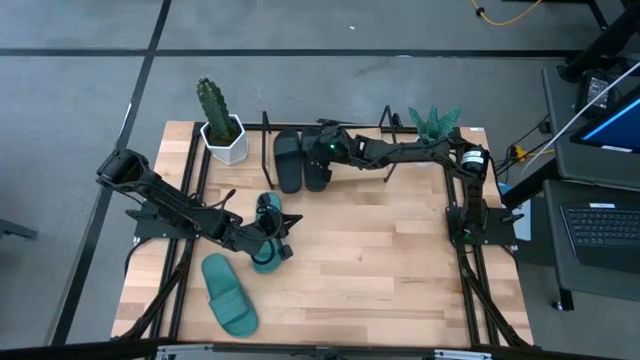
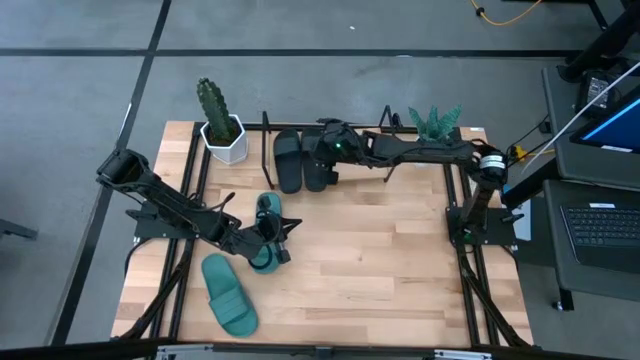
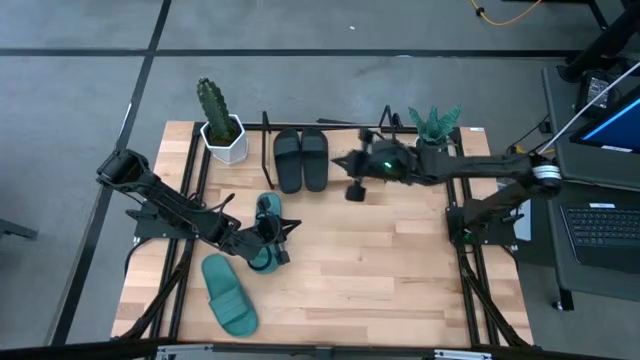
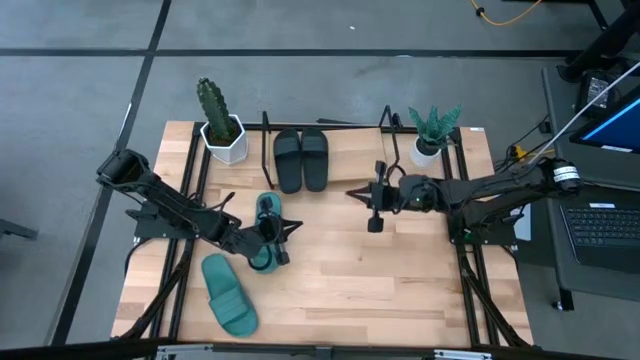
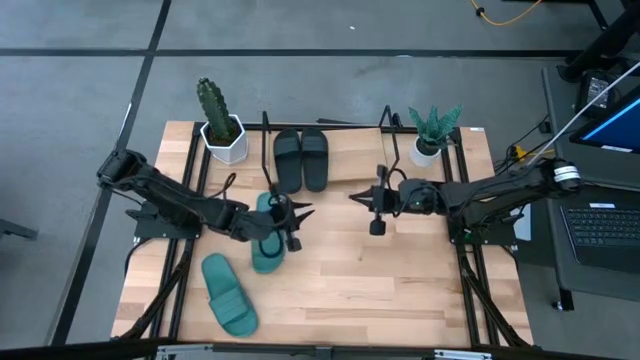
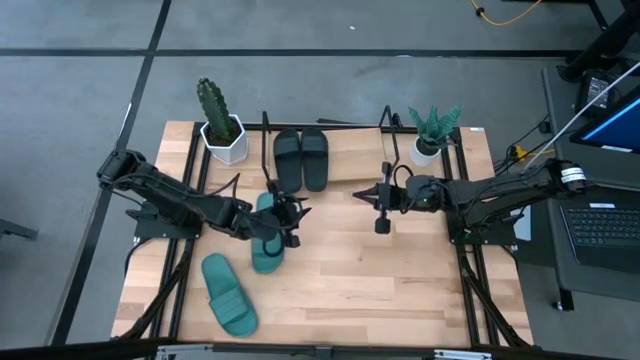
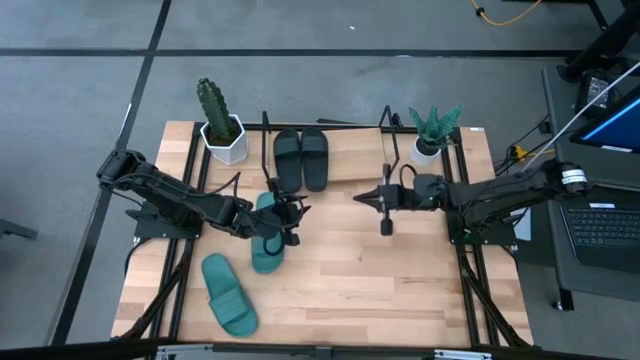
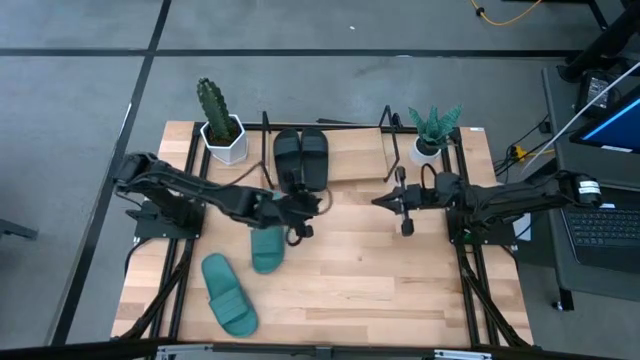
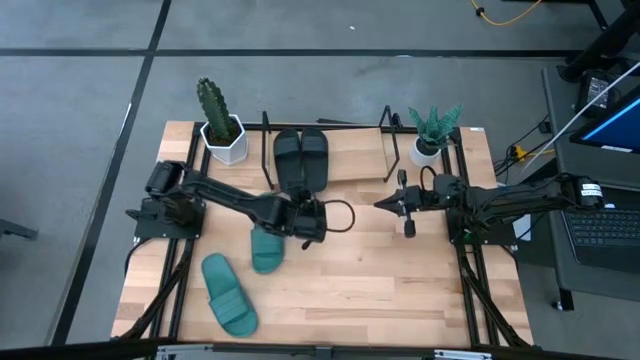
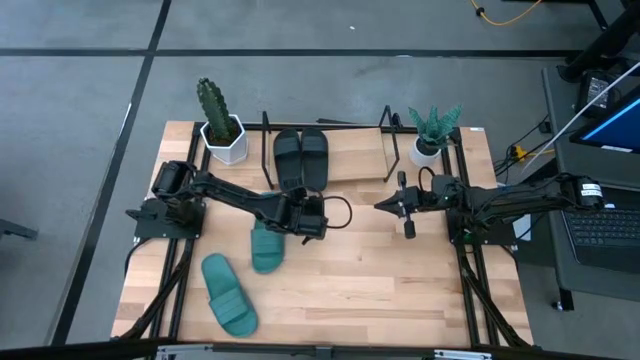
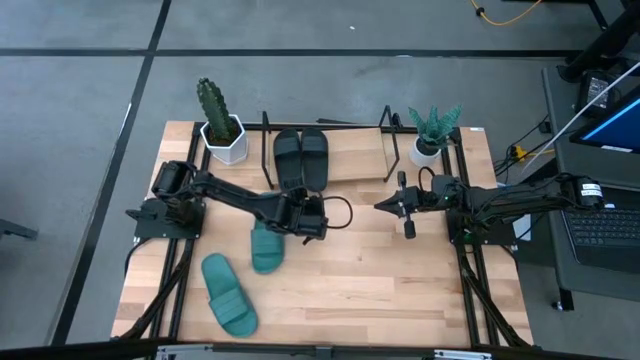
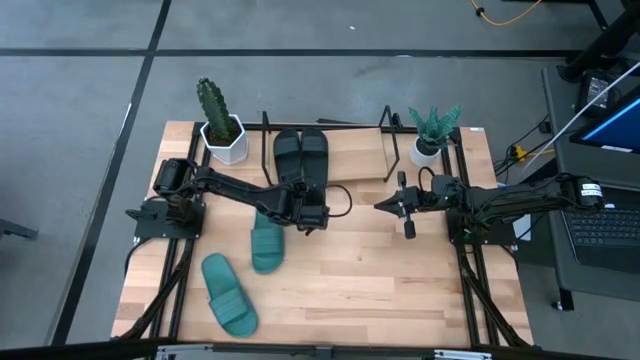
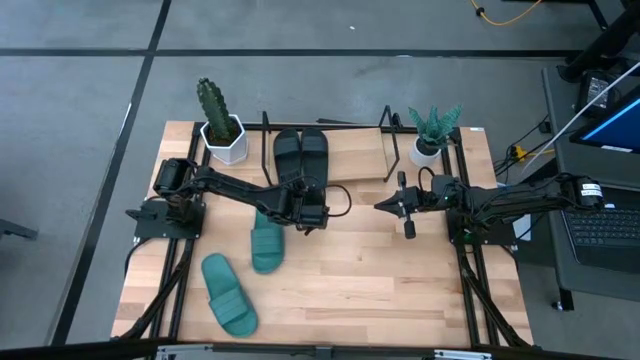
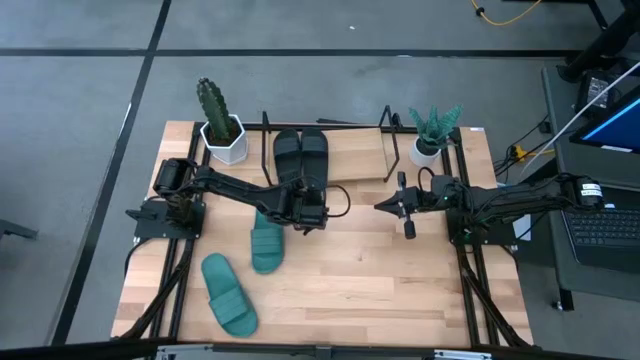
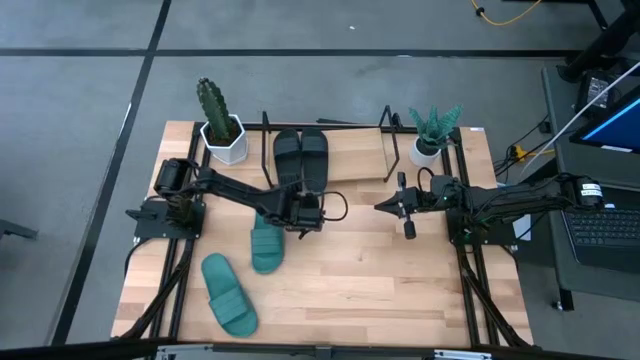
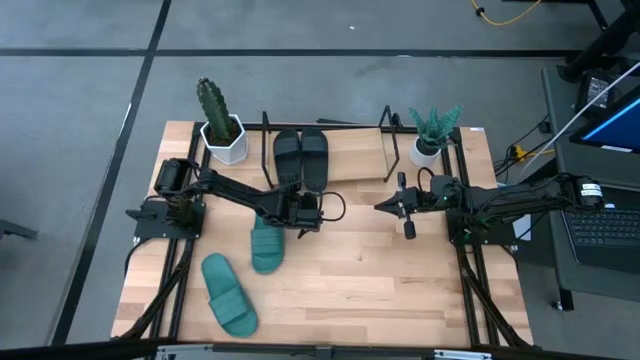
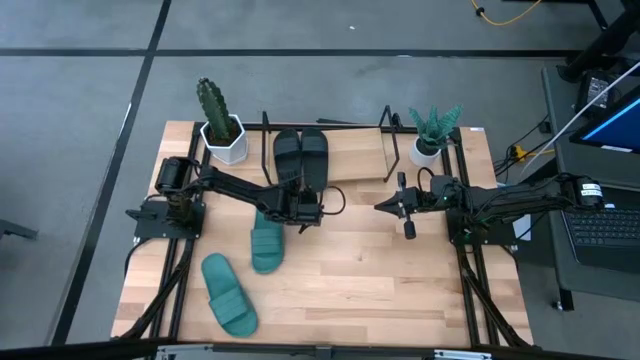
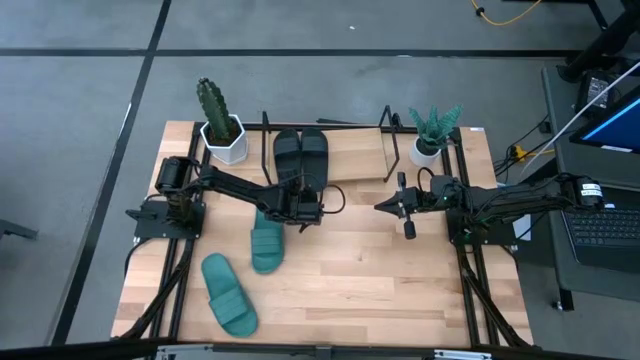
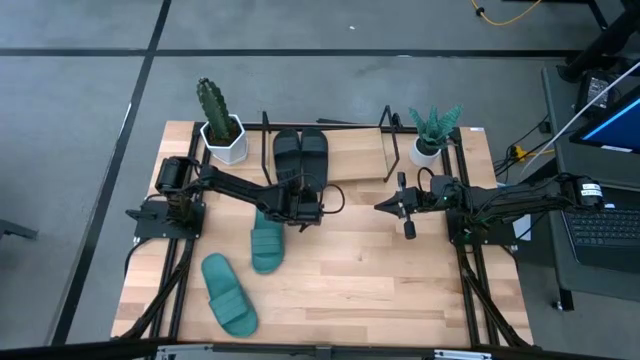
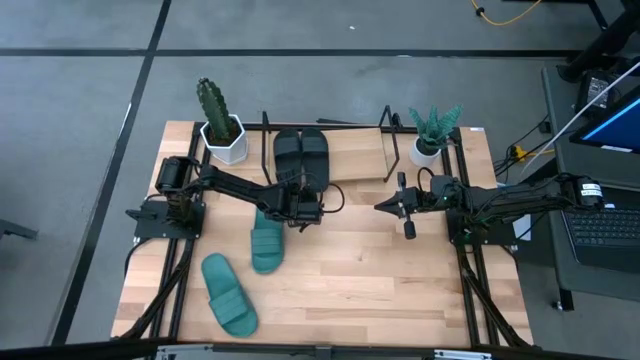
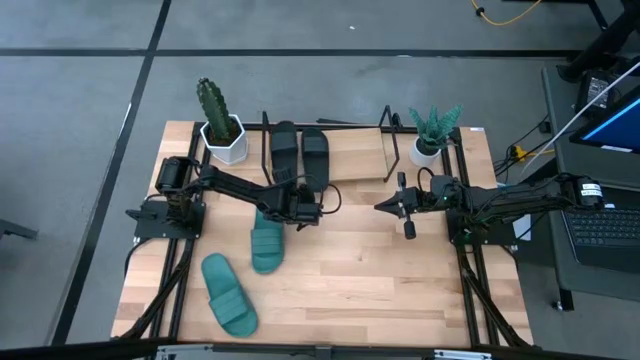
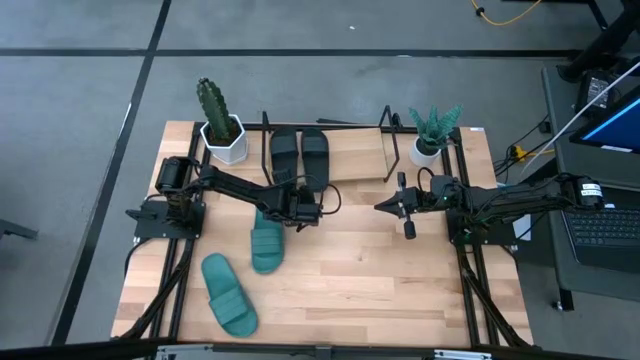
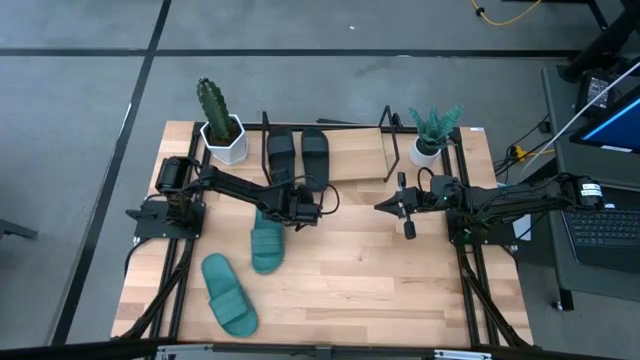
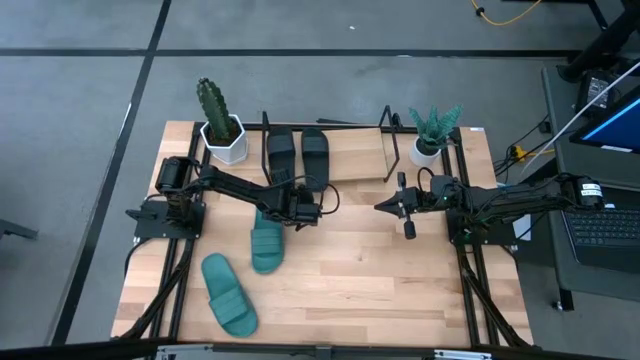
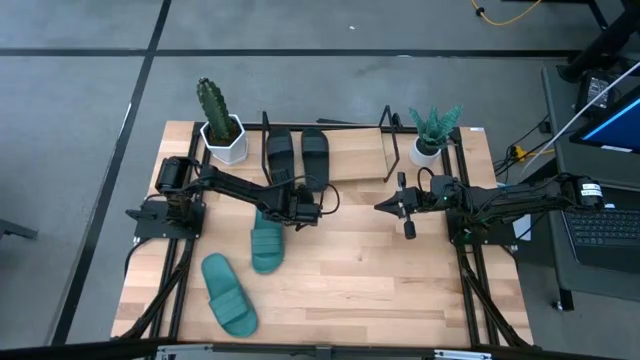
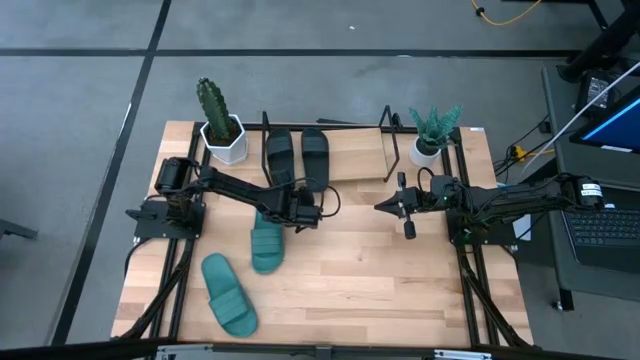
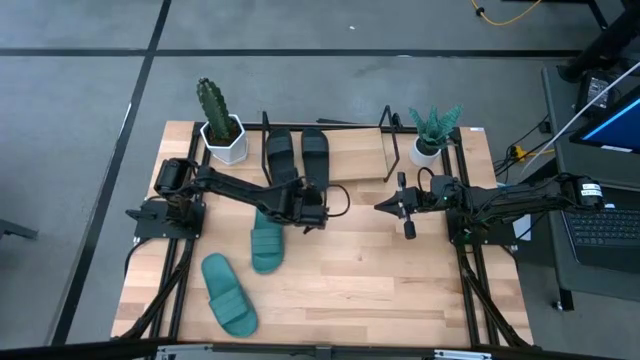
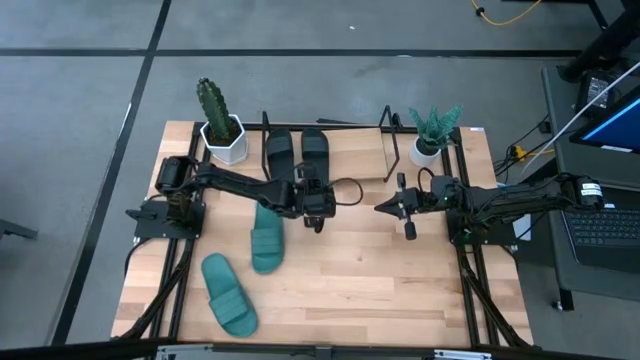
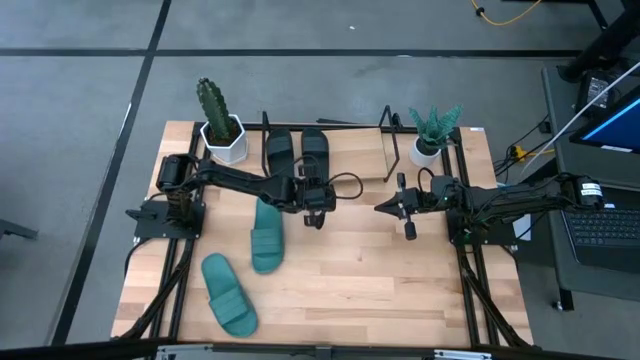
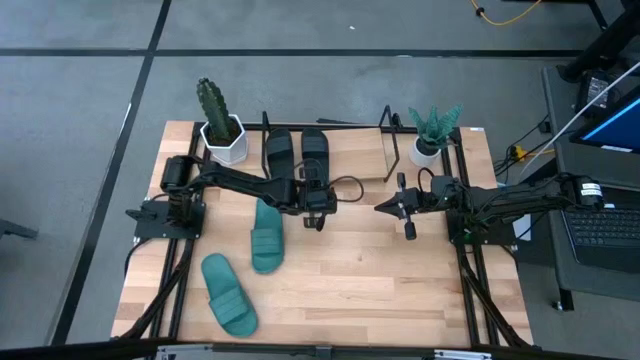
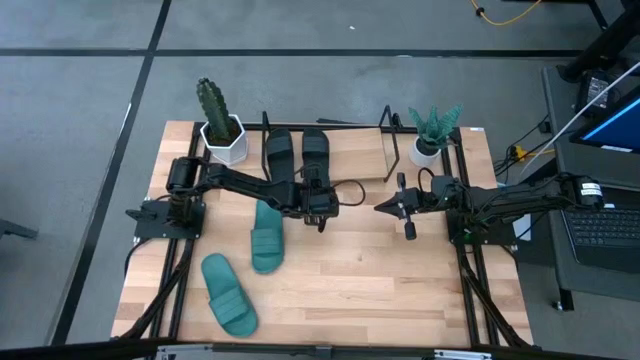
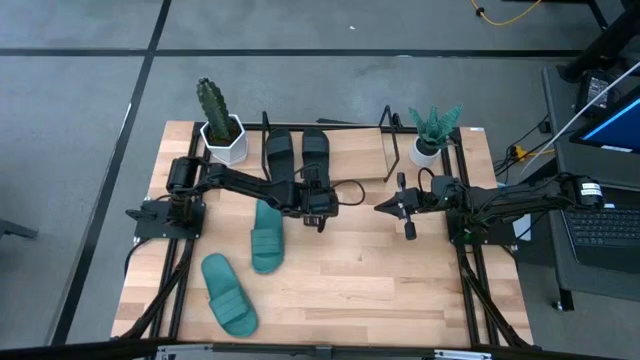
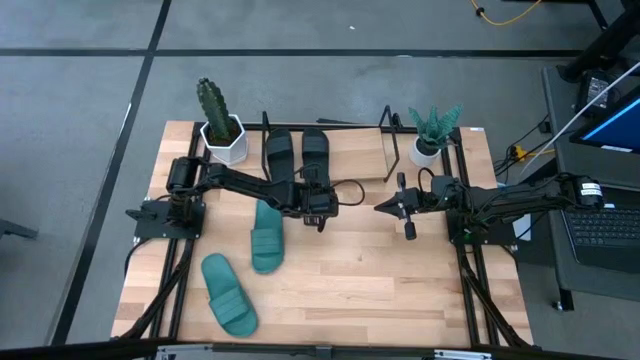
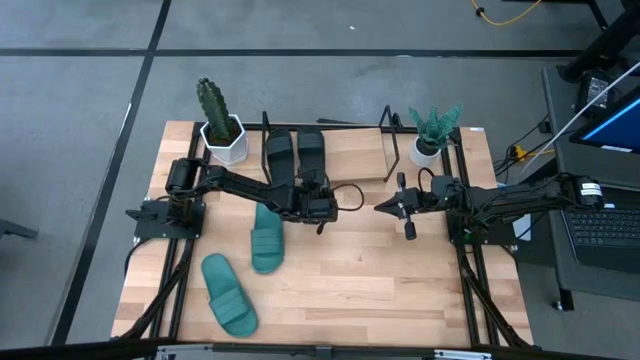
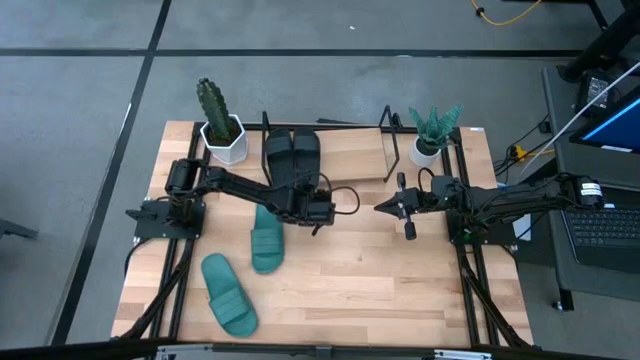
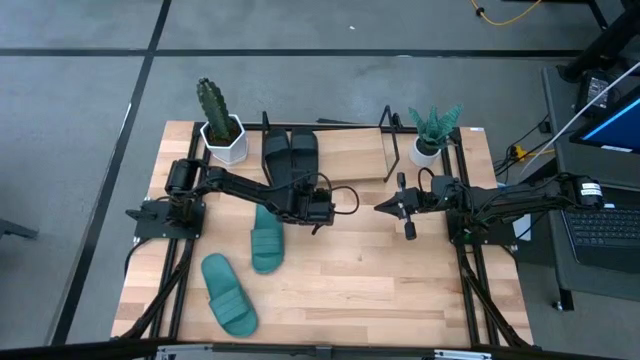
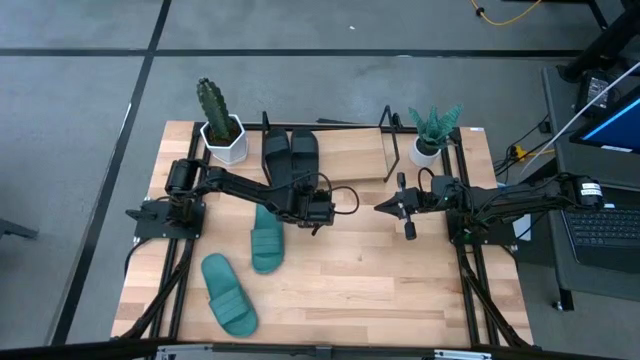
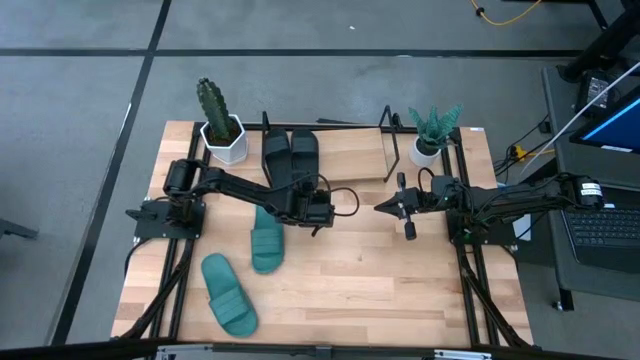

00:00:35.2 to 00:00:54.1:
Task: Pick and place slides into the shelf
Adjust the black slides on the shelf
